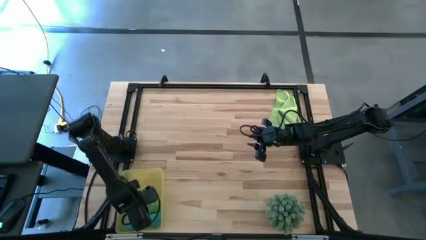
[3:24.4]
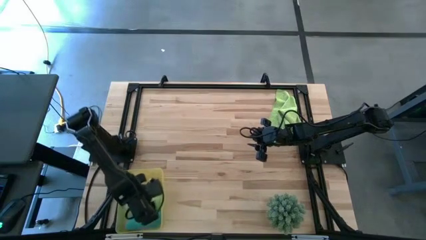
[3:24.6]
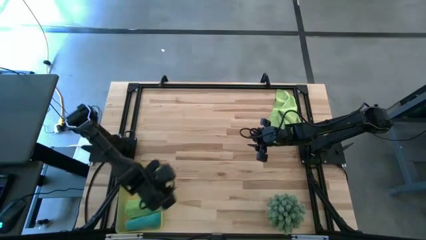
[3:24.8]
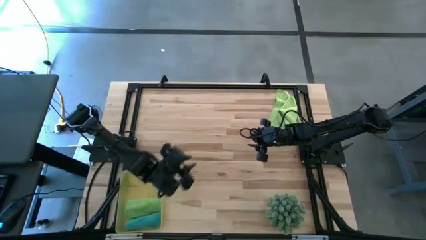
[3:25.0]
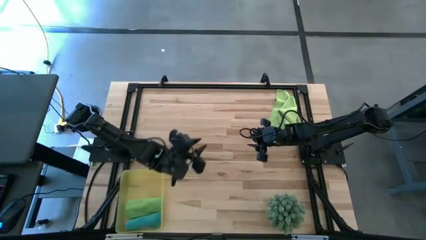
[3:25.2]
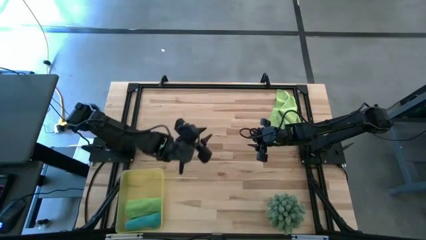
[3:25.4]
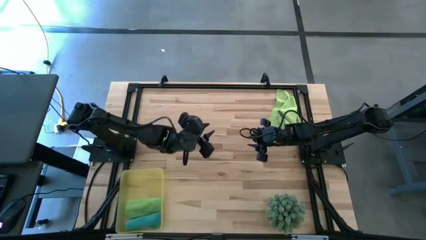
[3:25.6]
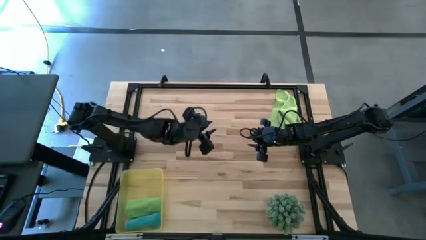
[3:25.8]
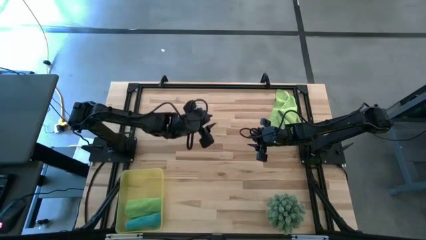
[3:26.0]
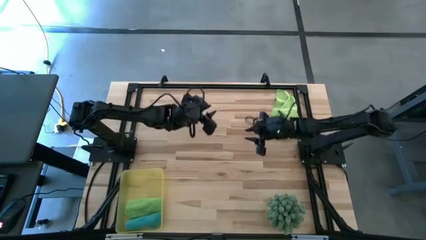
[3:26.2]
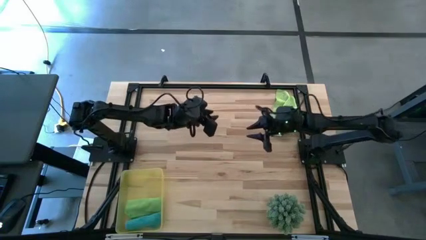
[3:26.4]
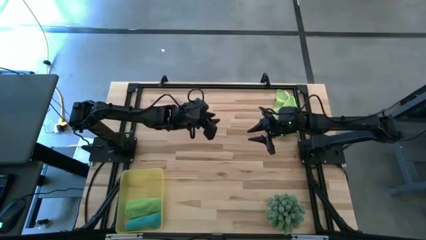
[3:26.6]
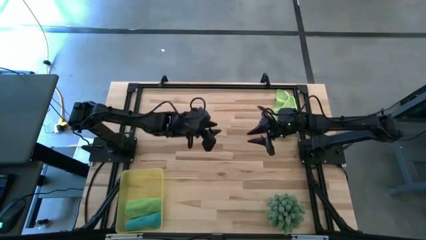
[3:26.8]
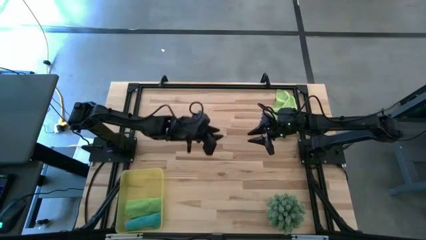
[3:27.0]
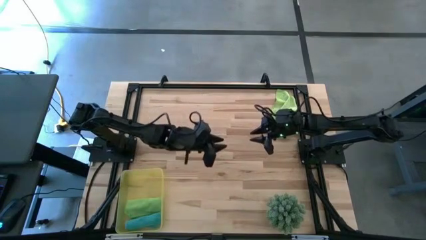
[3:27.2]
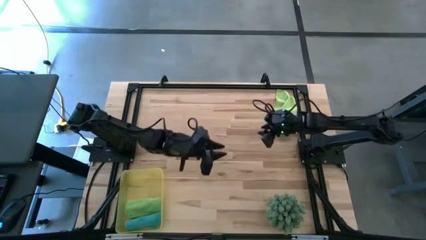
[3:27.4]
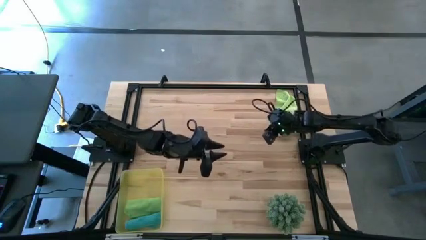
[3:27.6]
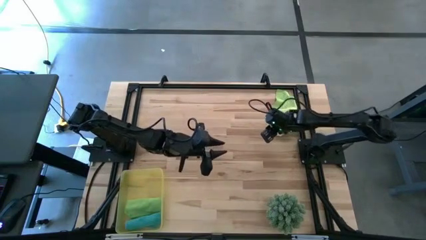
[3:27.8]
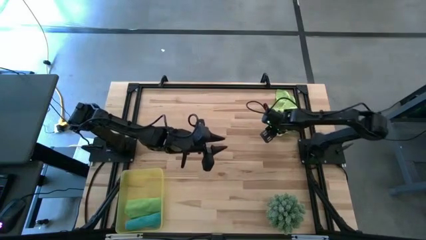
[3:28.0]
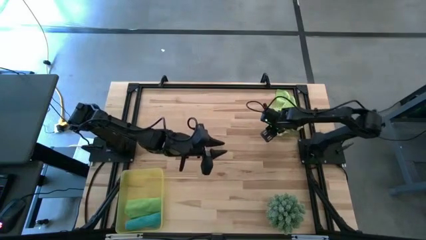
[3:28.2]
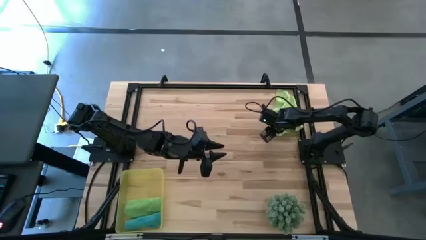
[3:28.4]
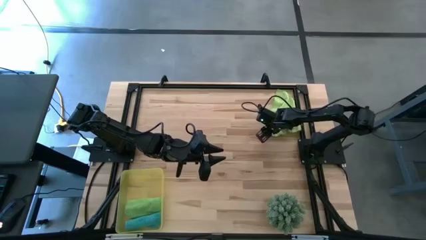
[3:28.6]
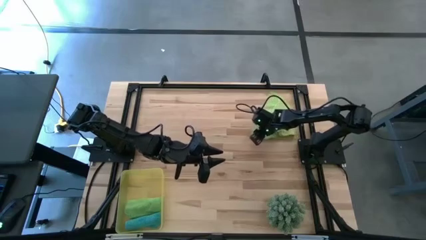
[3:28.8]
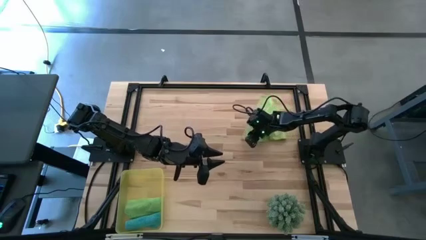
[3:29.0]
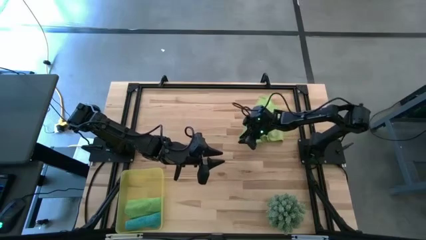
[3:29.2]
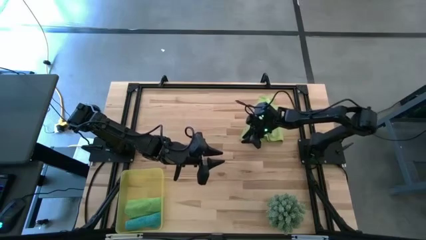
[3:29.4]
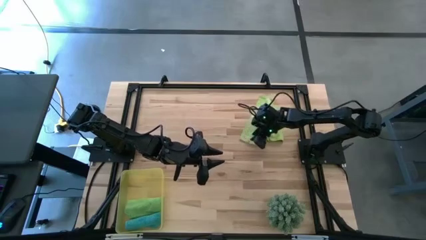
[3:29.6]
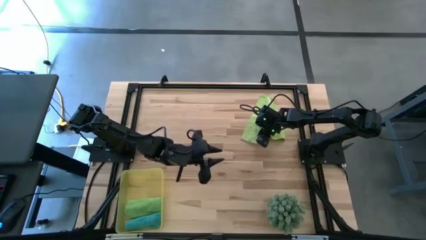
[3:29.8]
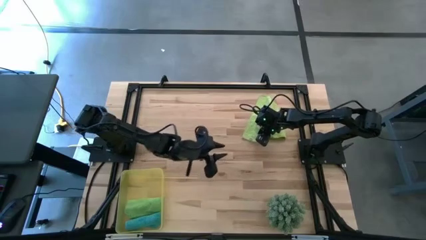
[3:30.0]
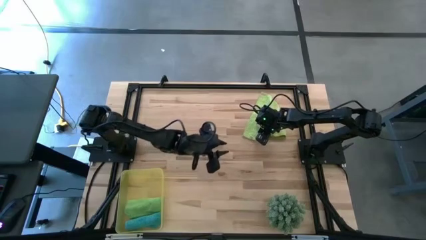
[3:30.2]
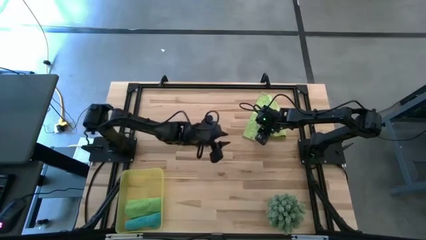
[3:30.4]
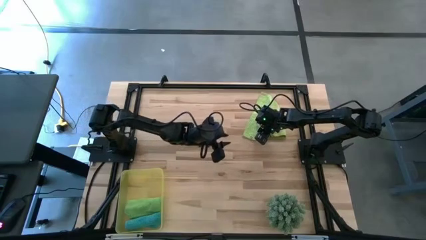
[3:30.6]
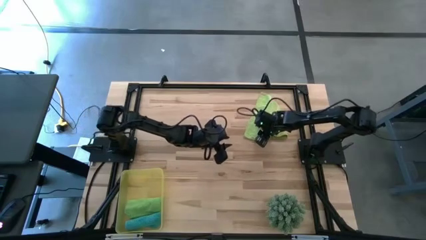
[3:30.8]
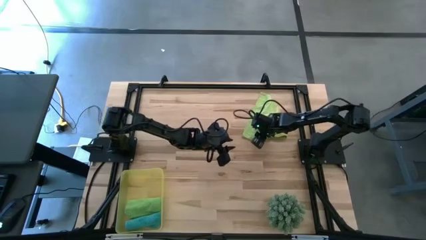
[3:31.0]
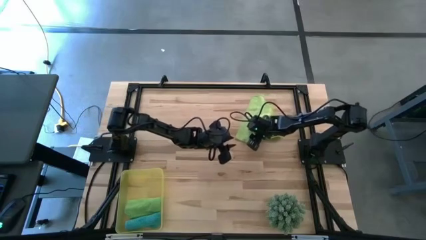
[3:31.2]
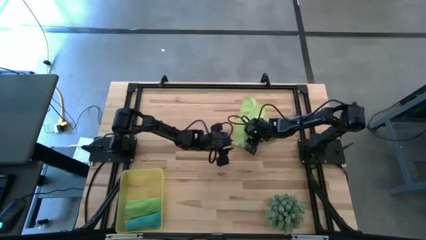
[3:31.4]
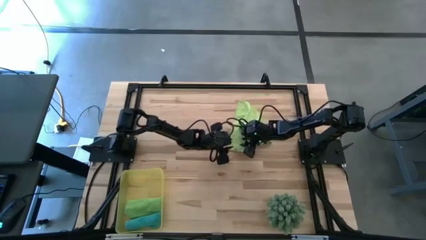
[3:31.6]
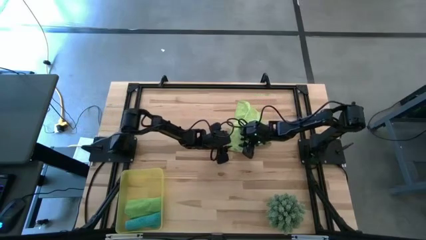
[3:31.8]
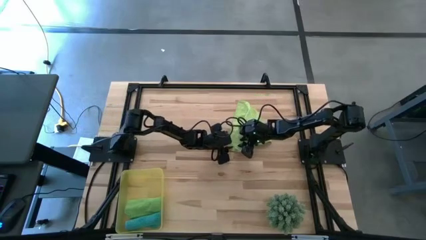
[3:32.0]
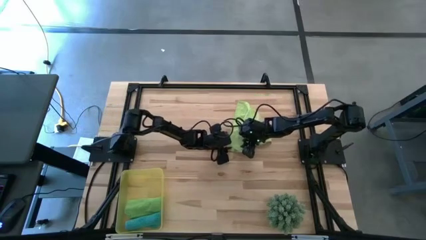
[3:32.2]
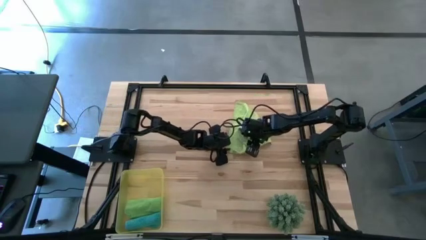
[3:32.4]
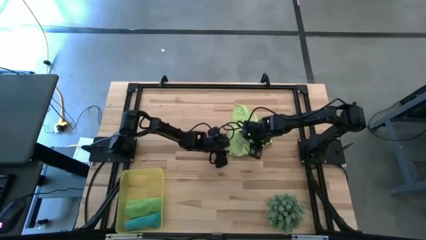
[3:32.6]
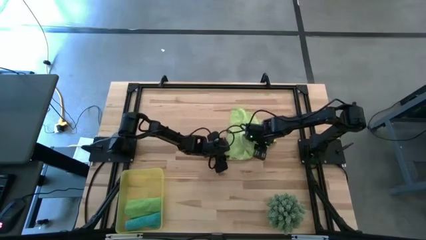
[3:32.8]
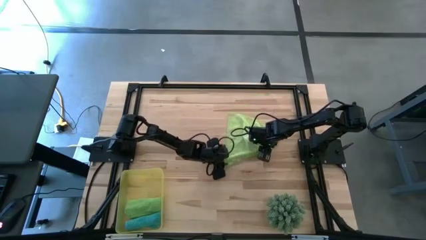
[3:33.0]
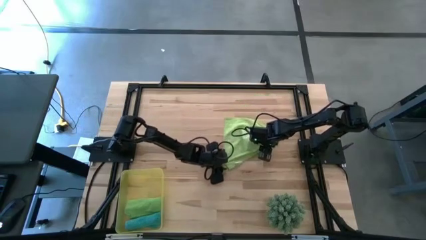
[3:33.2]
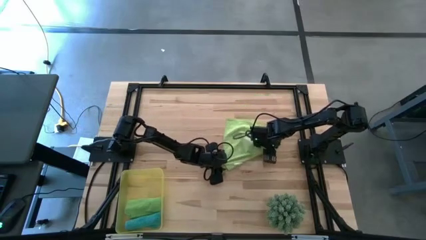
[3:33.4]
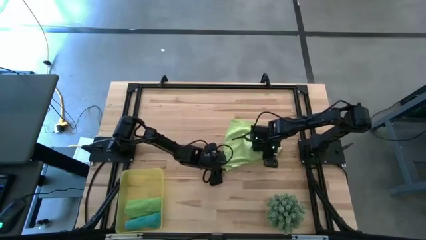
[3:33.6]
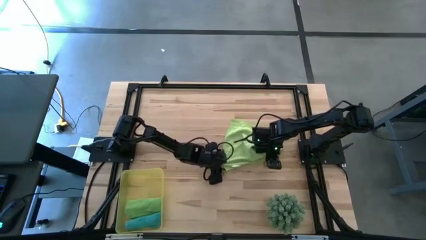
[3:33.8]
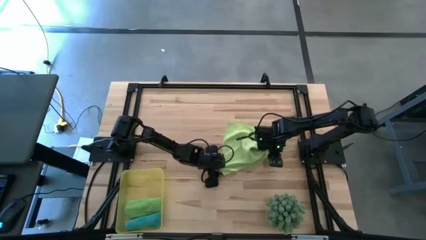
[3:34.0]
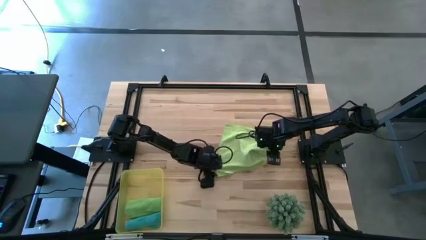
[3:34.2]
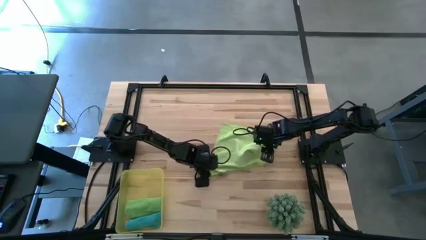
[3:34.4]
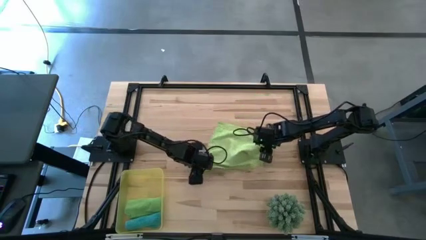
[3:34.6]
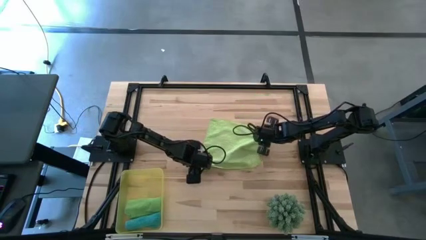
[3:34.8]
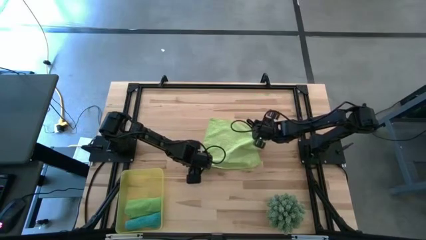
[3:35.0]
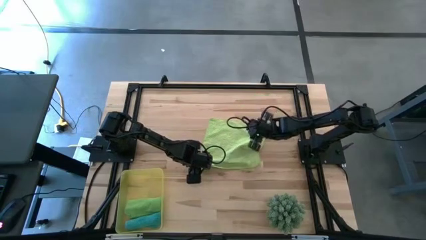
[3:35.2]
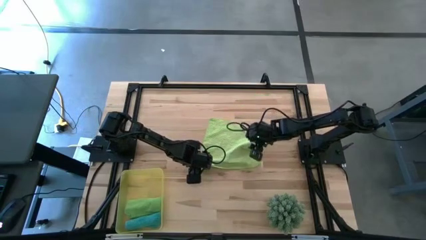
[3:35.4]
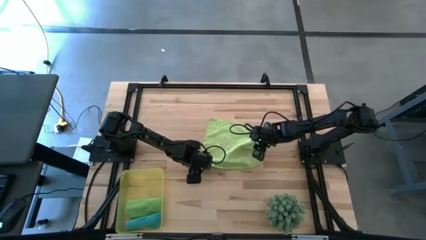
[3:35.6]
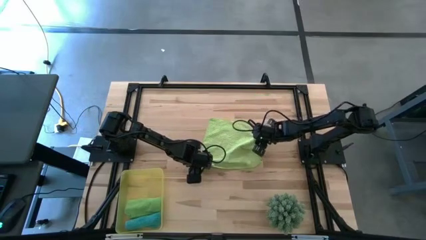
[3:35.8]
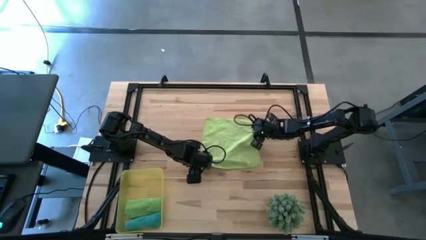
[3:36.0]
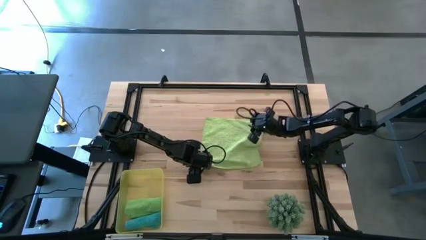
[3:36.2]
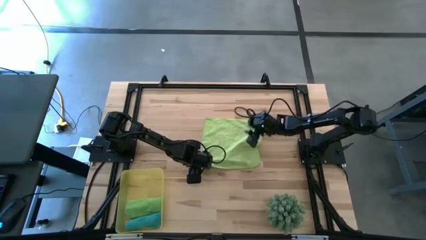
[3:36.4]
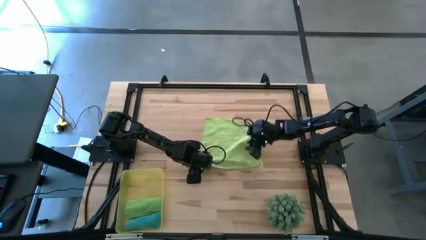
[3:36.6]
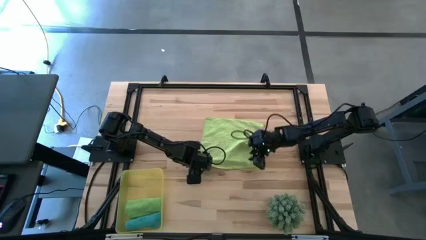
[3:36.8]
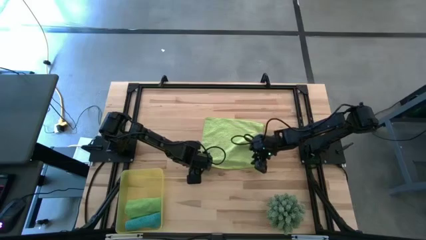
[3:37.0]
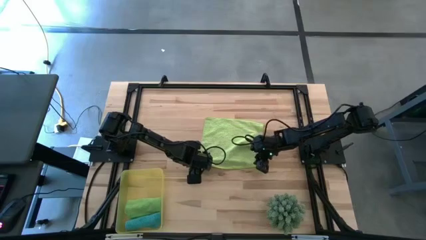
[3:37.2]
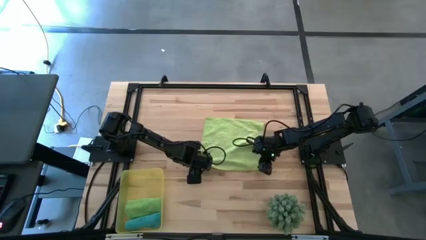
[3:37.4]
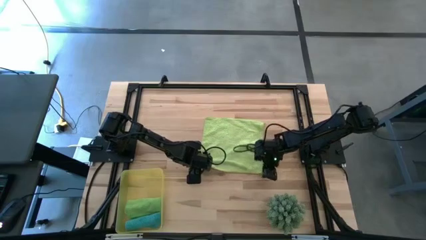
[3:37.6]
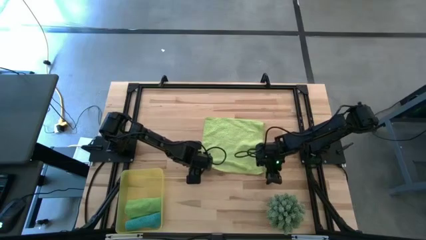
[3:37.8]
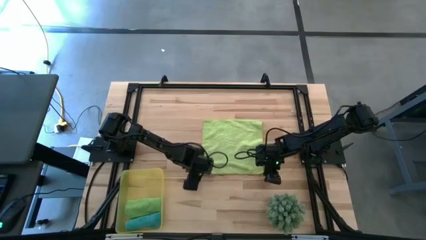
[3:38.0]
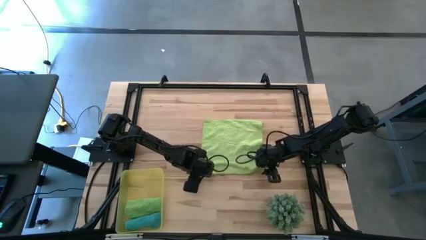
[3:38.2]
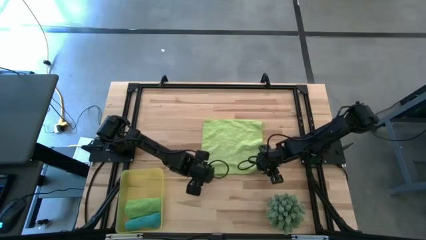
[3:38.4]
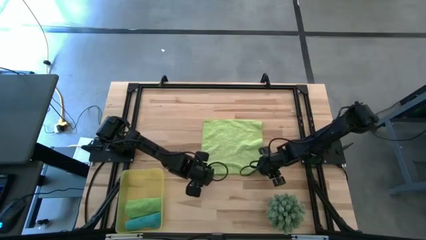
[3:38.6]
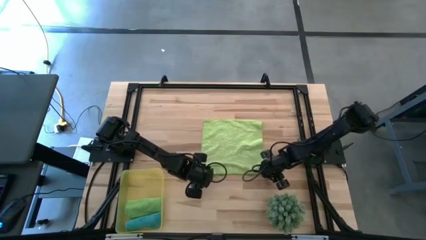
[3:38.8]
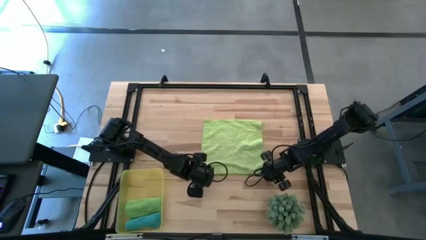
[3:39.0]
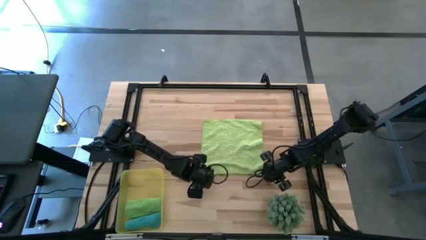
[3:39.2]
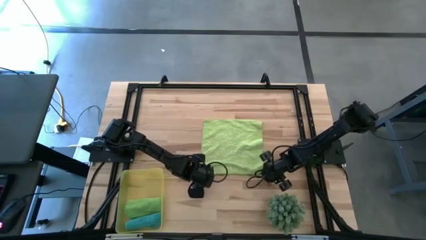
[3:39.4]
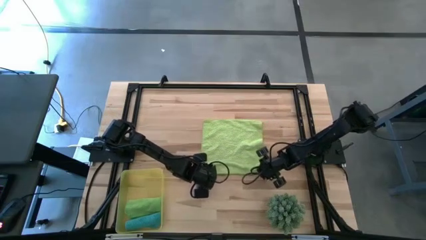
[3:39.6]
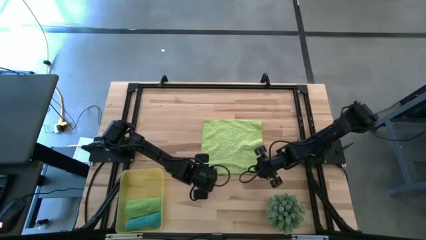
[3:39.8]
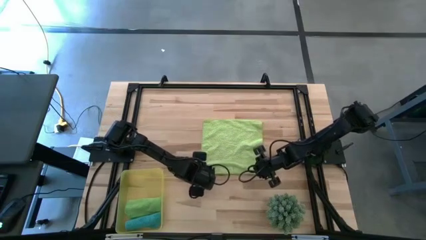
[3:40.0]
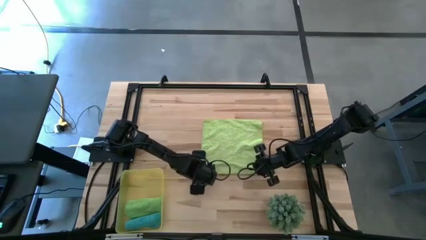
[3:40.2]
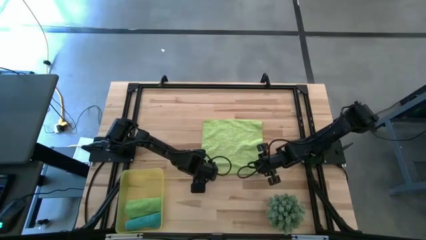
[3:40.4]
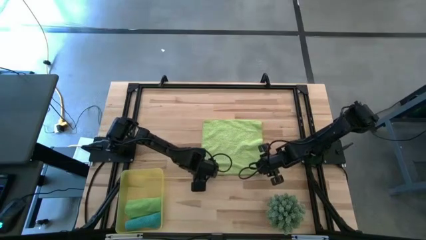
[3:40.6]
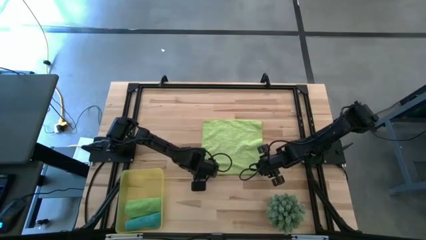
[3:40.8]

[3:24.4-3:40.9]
Task: Roll microfiber towels into tight, uniform cylinder then place into a basket
Roll the light green microfiber towel
